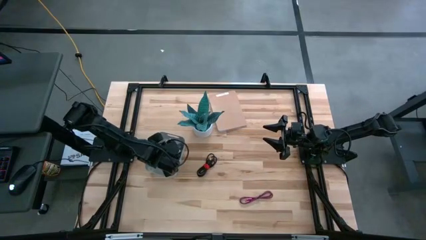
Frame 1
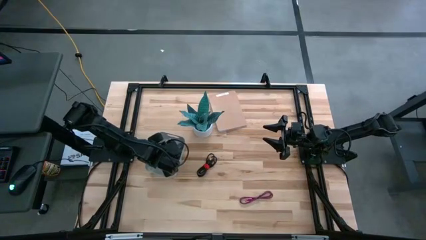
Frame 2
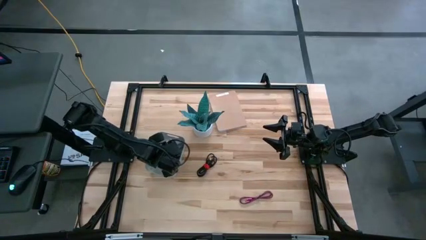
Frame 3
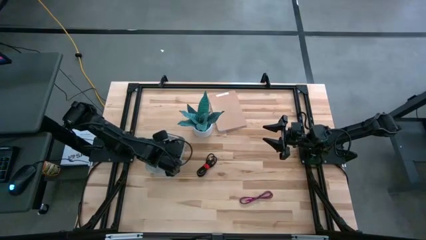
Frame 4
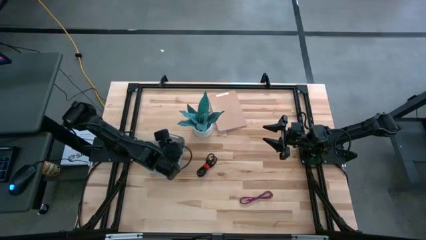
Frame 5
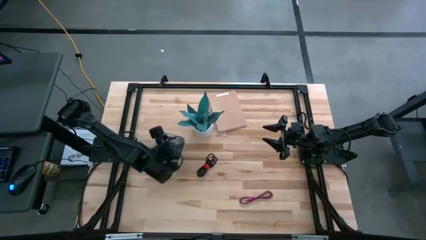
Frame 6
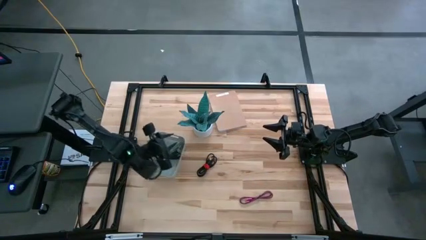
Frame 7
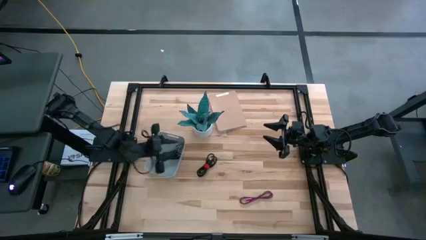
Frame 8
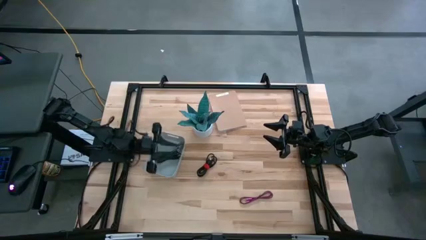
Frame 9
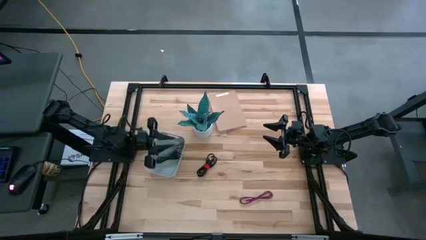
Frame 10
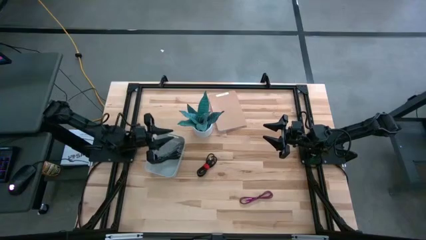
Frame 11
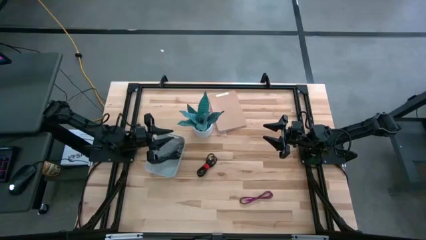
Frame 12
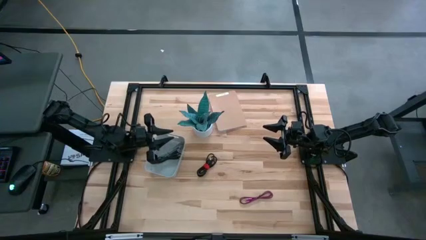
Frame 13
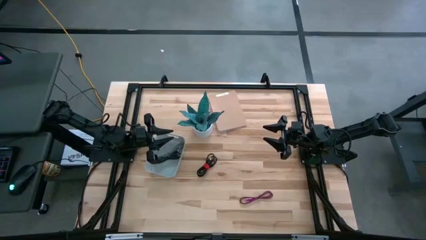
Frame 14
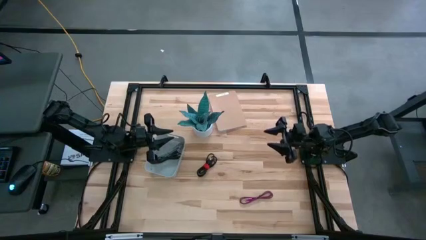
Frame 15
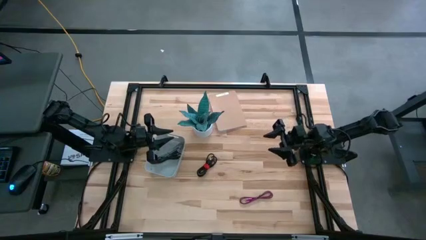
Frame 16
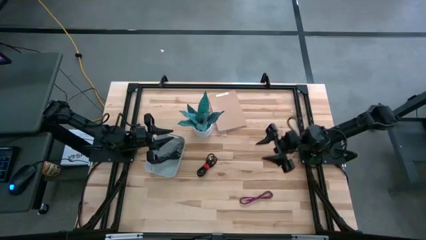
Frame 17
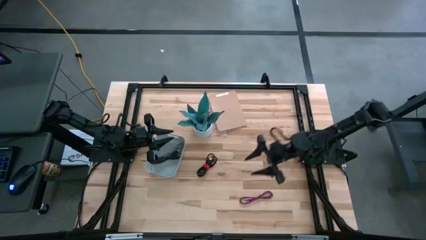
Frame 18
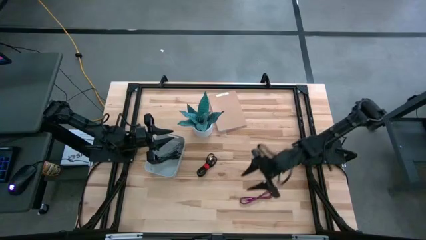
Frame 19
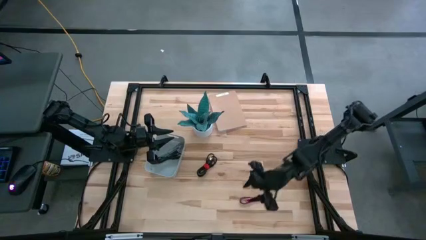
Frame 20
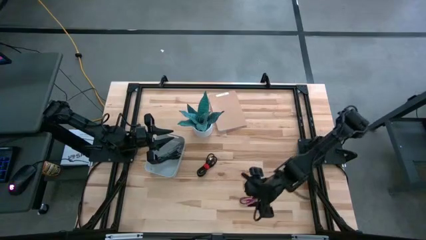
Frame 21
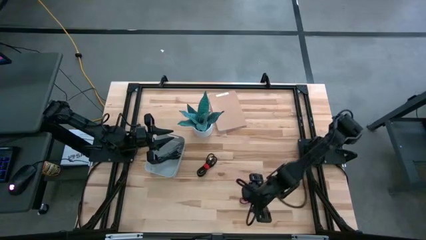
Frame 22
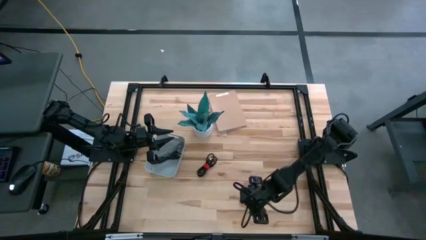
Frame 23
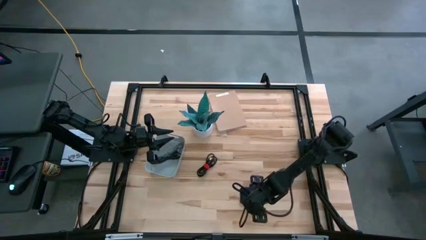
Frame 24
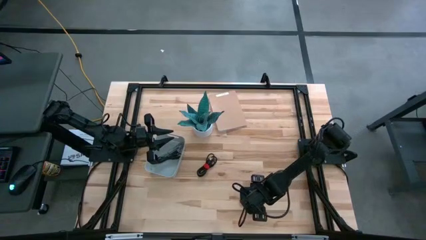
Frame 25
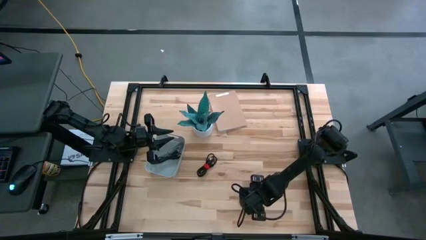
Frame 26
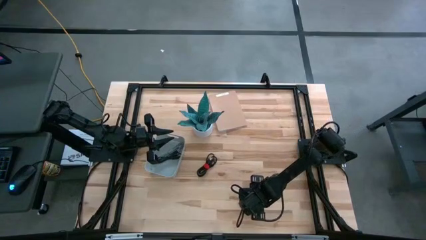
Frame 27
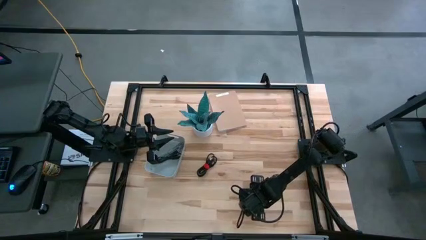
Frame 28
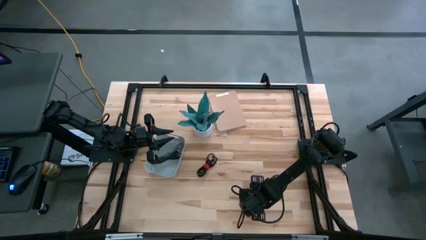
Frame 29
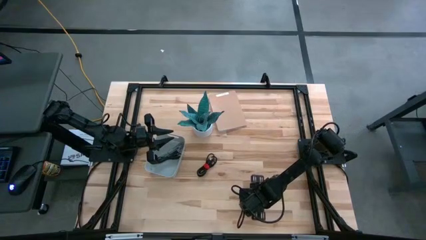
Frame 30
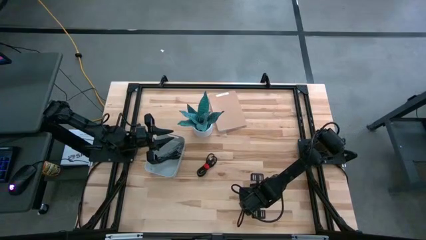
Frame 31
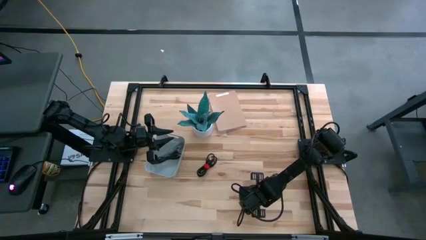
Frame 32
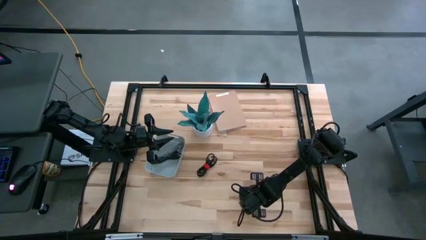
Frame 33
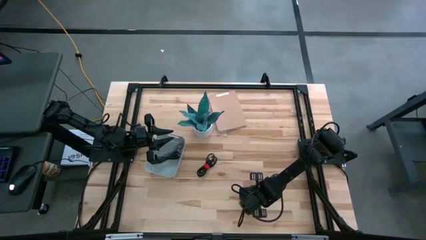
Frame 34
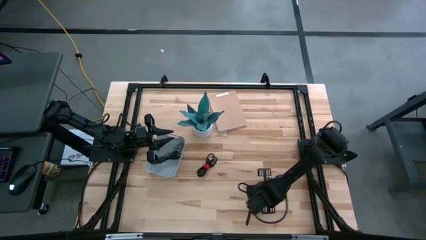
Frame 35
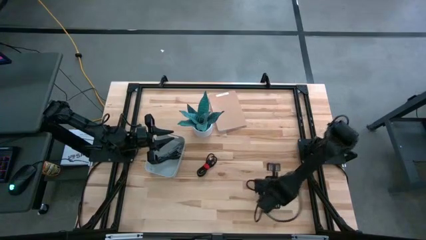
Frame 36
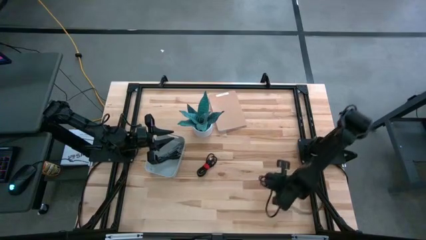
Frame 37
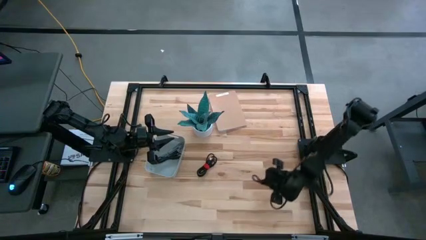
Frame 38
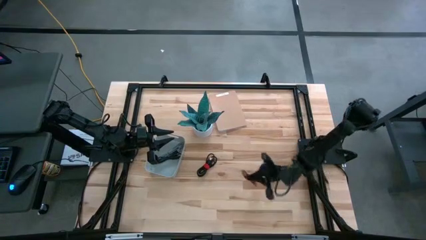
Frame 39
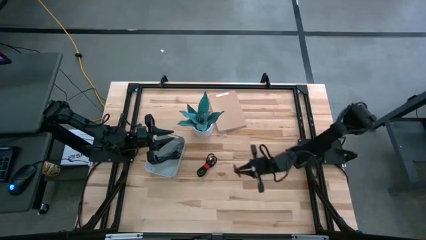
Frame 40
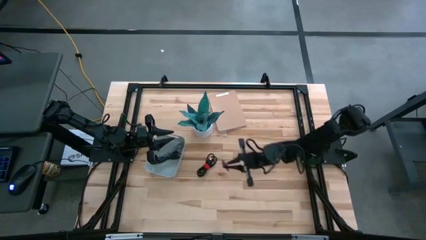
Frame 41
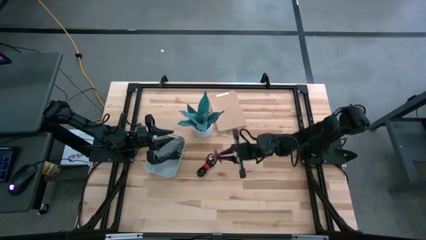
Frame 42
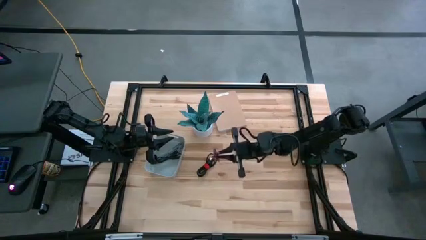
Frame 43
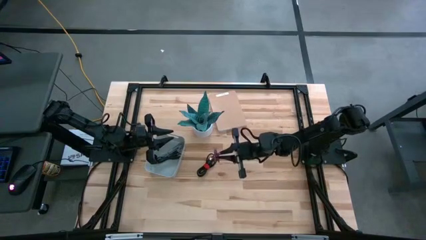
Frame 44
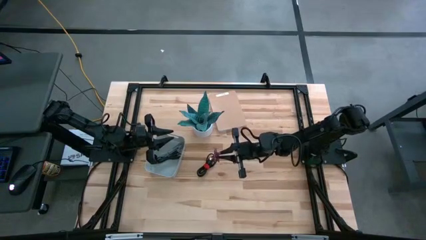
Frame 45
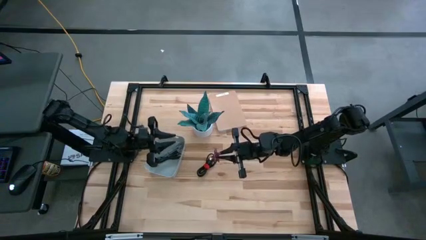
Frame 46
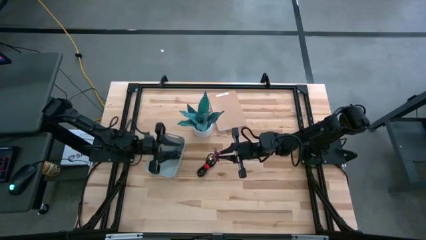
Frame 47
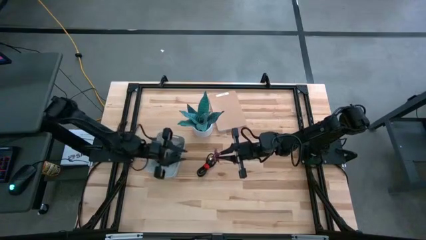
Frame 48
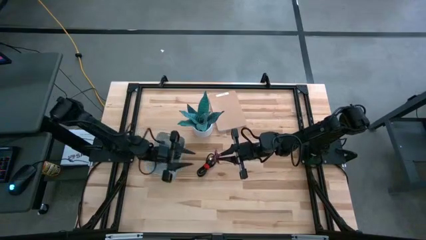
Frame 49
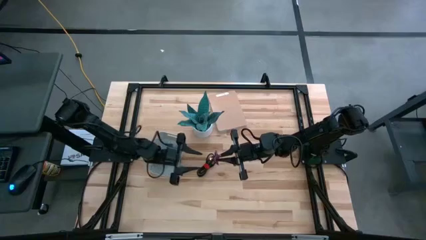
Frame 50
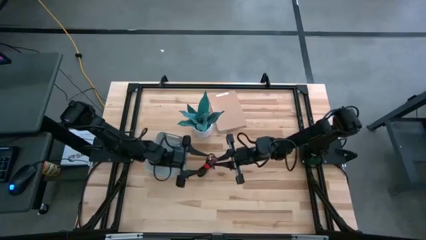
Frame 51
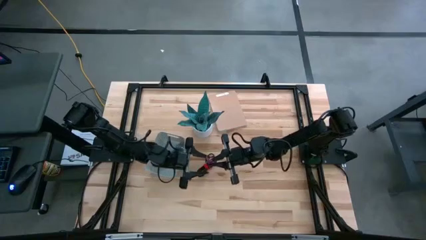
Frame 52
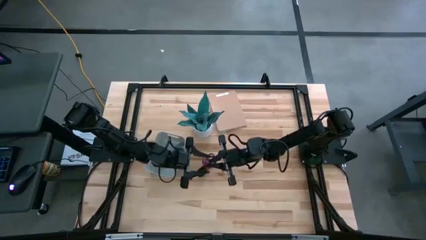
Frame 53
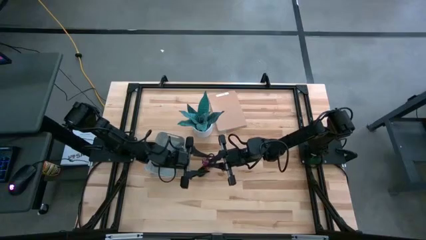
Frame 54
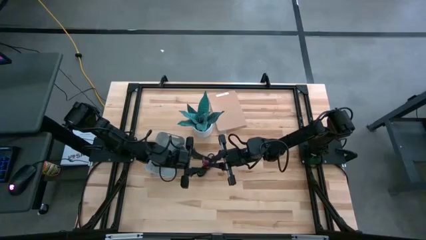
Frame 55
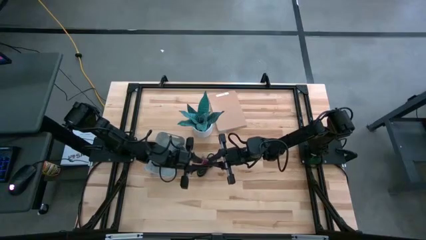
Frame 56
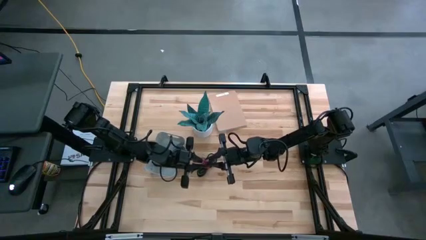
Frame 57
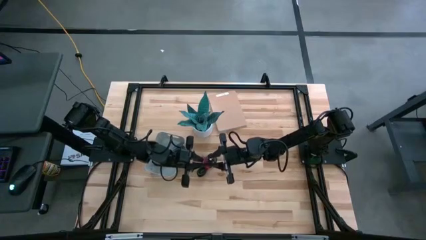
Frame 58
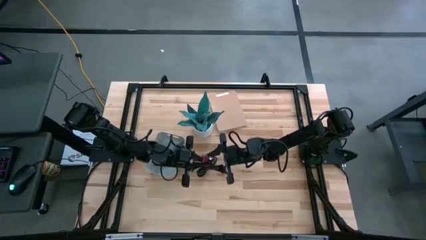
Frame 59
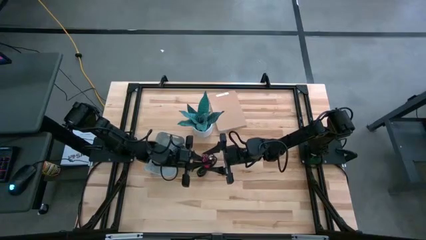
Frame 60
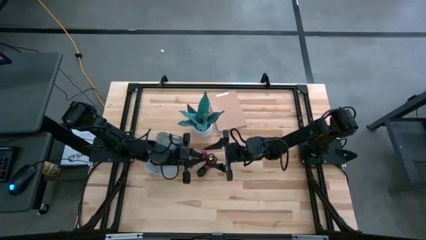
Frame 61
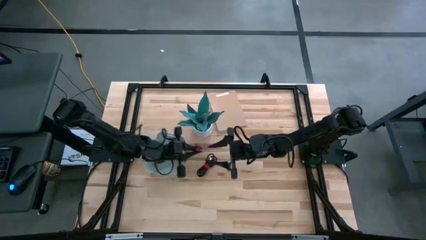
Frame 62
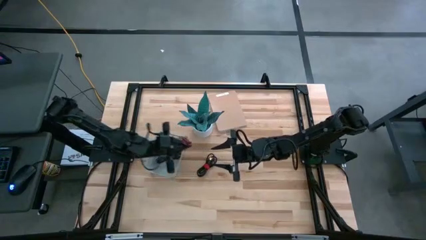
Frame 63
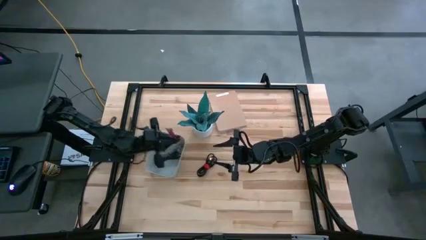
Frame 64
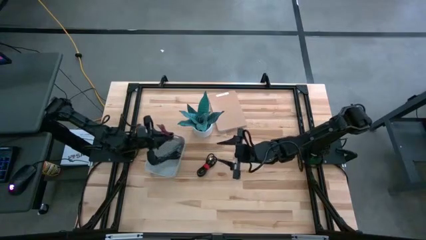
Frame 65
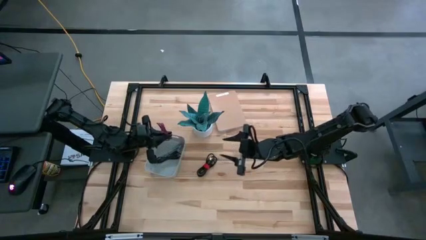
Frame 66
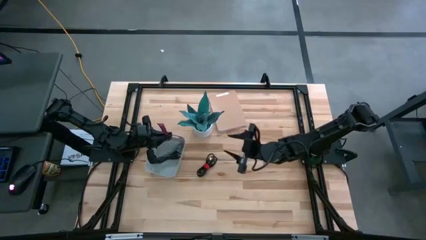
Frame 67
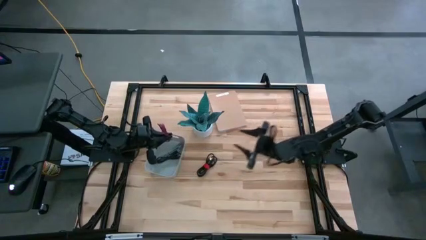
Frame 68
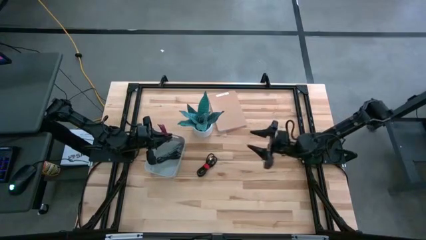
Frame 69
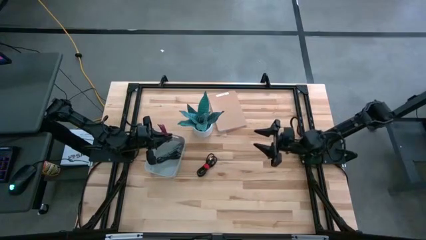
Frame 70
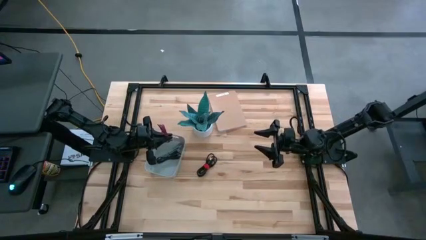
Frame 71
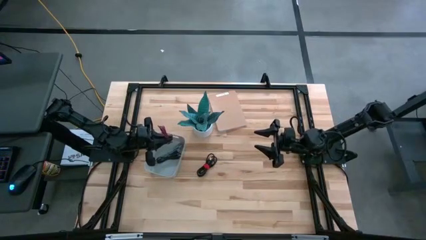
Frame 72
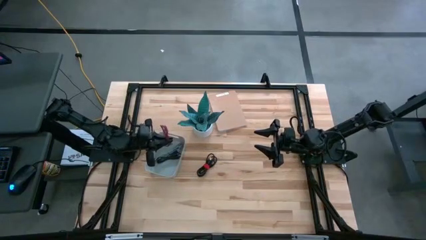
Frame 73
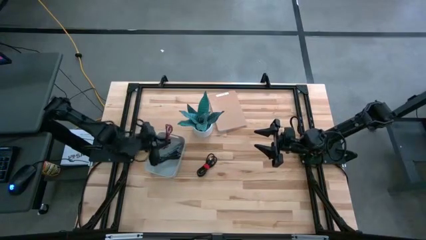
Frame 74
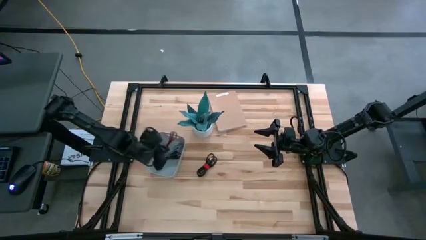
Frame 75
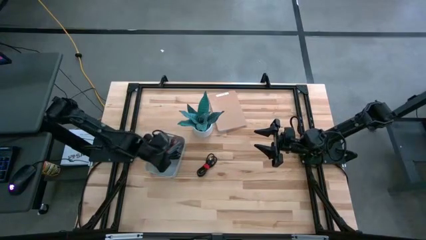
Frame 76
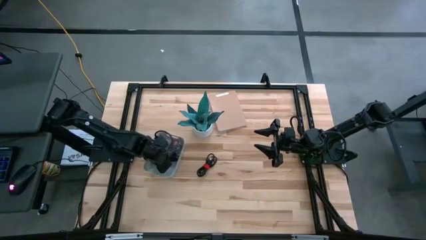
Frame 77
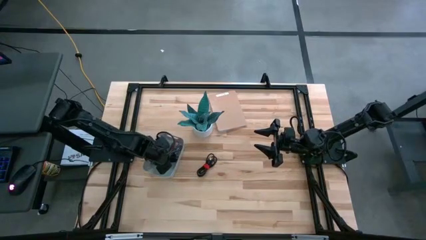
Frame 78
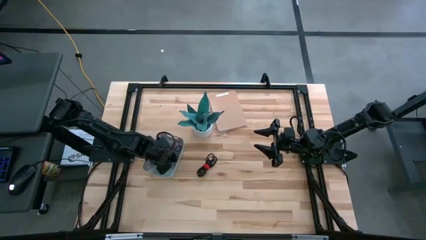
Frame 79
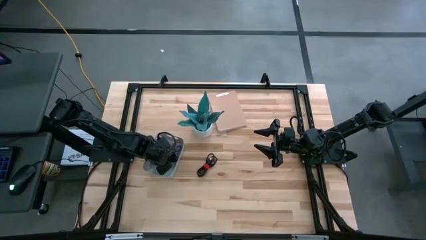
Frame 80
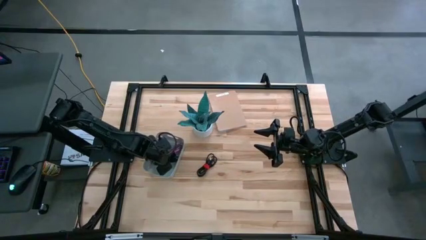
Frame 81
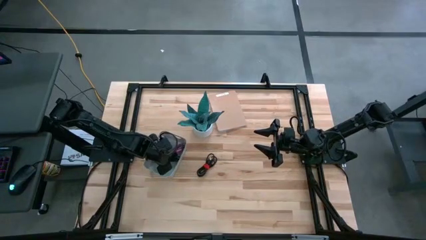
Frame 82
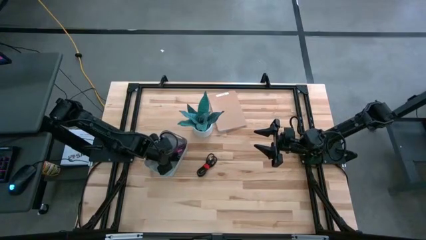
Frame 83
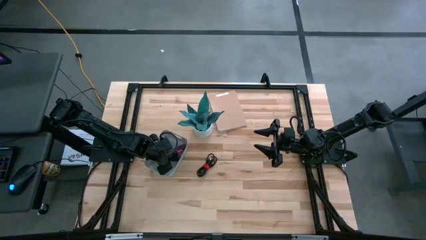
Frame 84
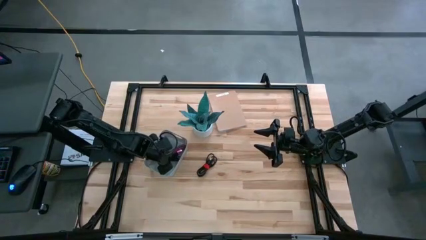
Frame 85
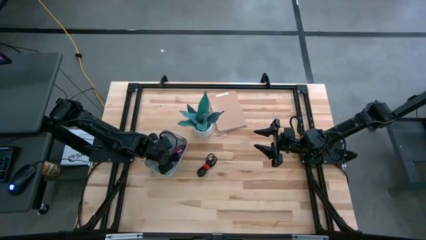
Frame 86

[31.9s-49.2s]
Task: Pick and place USB-C Cables
Put the pink patterned charger cable into the bin
